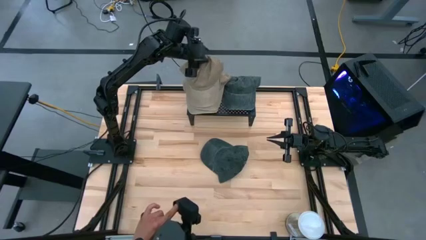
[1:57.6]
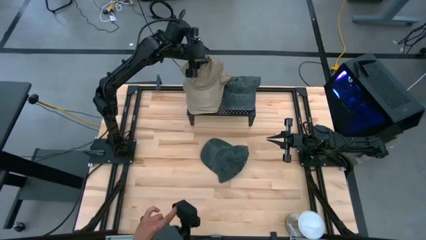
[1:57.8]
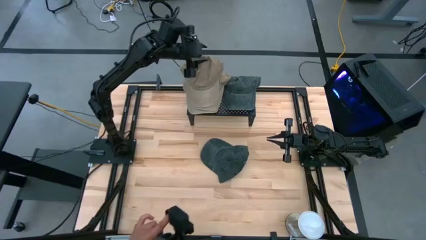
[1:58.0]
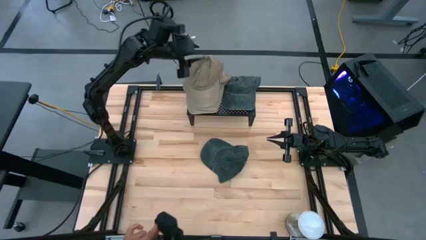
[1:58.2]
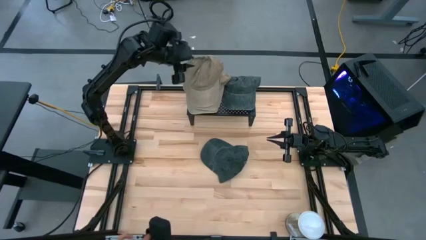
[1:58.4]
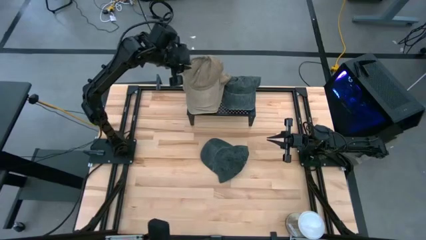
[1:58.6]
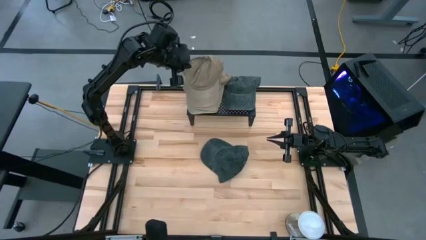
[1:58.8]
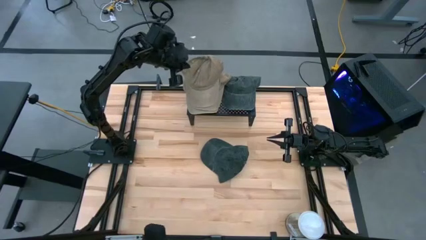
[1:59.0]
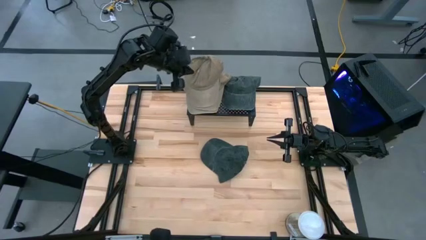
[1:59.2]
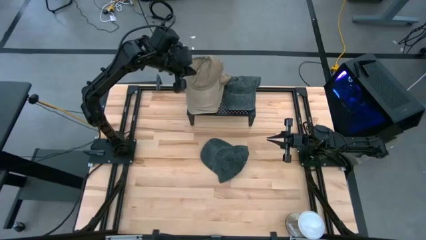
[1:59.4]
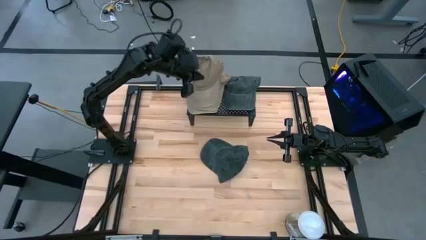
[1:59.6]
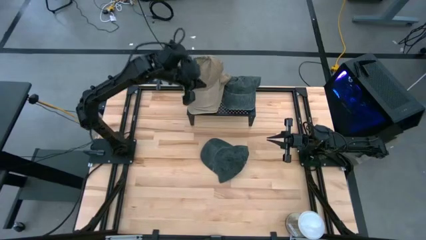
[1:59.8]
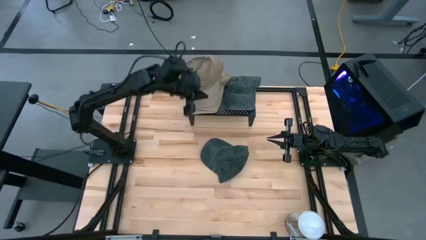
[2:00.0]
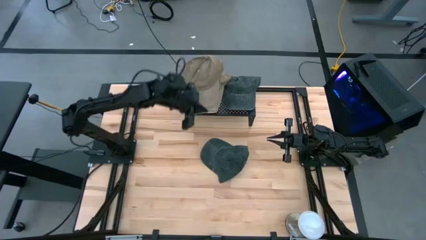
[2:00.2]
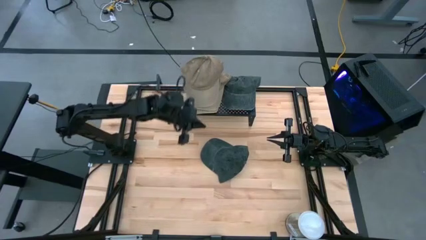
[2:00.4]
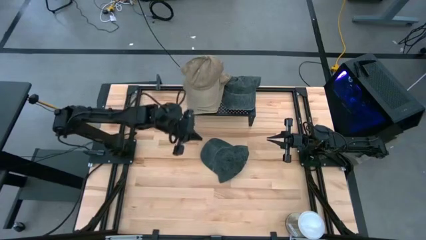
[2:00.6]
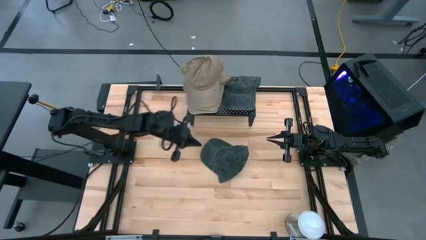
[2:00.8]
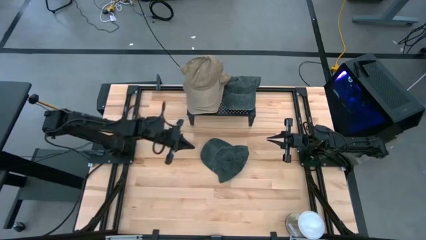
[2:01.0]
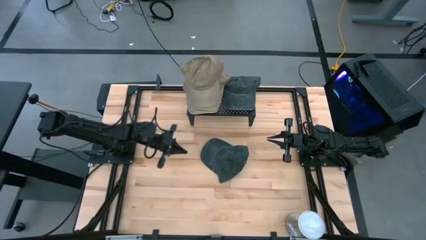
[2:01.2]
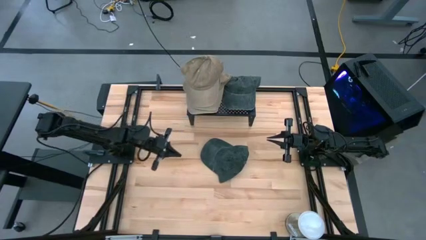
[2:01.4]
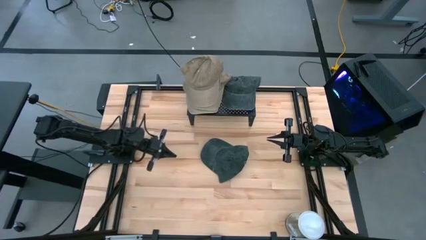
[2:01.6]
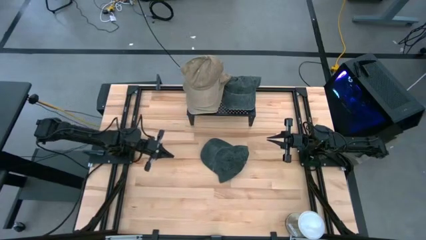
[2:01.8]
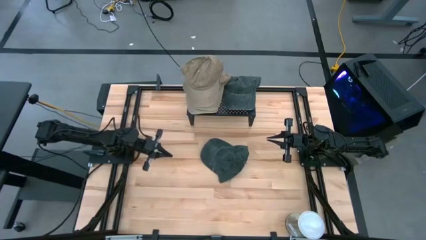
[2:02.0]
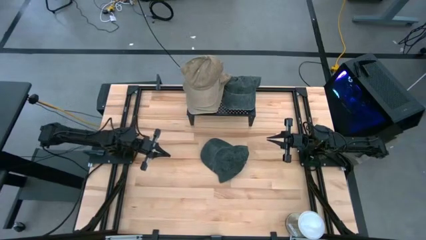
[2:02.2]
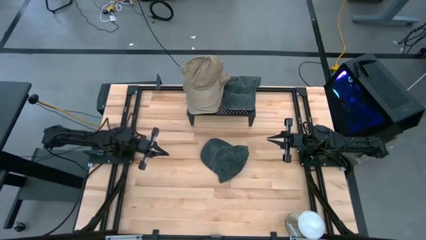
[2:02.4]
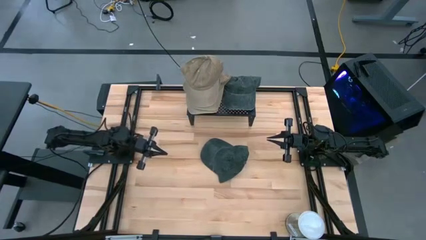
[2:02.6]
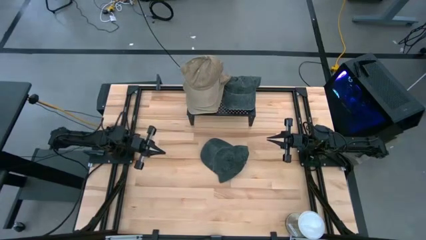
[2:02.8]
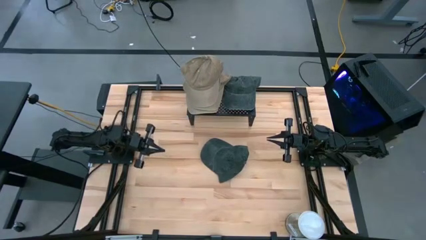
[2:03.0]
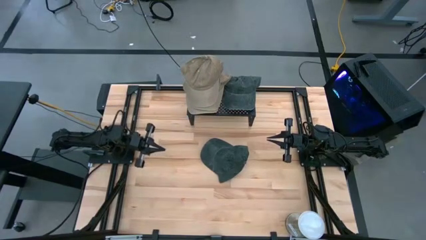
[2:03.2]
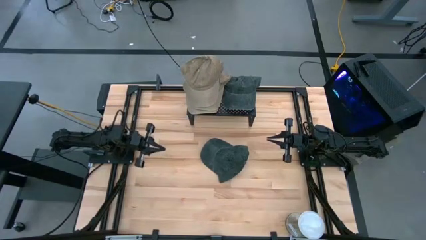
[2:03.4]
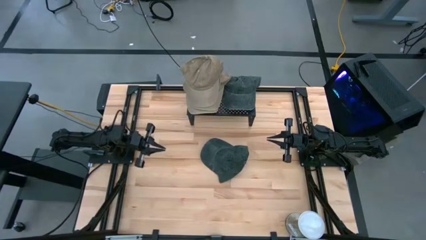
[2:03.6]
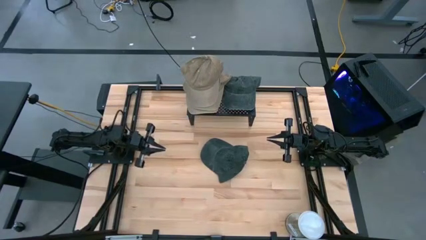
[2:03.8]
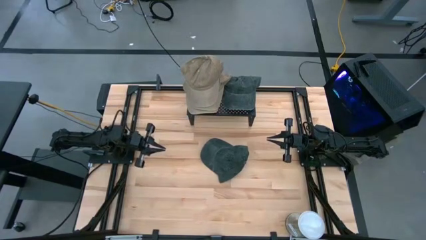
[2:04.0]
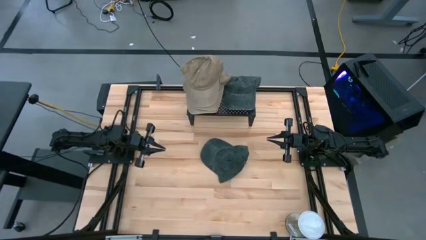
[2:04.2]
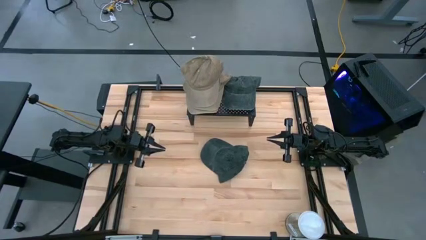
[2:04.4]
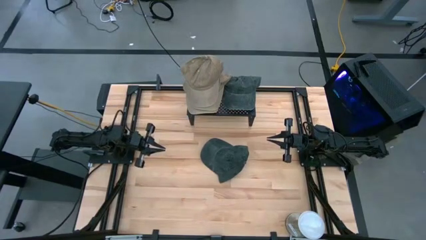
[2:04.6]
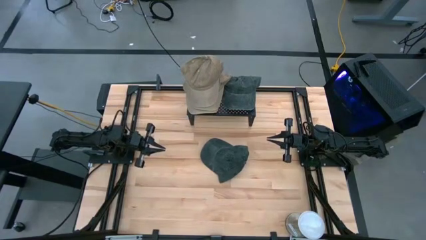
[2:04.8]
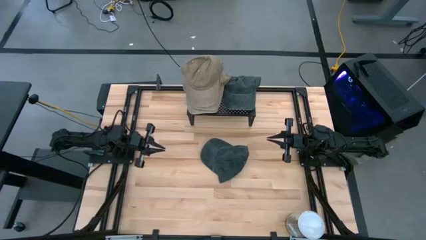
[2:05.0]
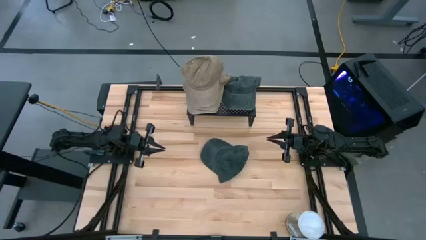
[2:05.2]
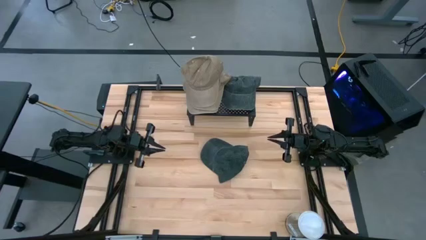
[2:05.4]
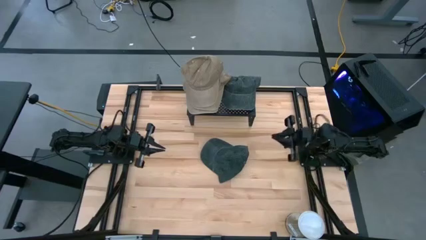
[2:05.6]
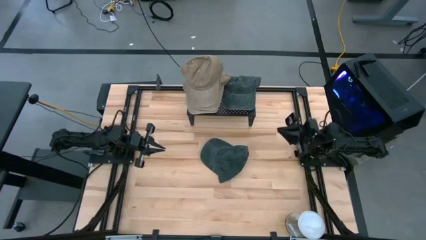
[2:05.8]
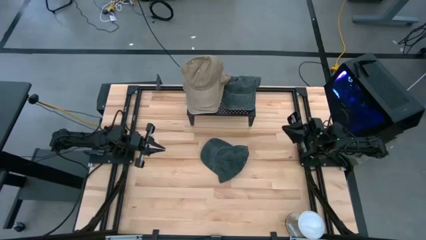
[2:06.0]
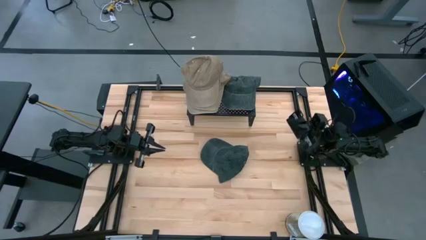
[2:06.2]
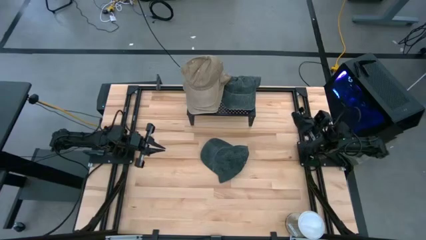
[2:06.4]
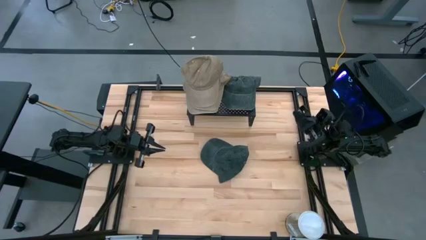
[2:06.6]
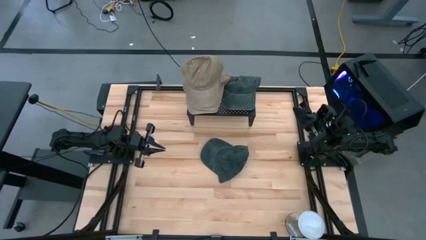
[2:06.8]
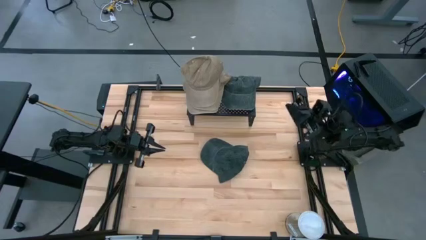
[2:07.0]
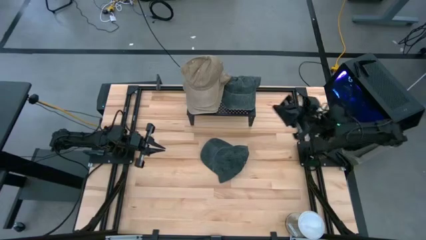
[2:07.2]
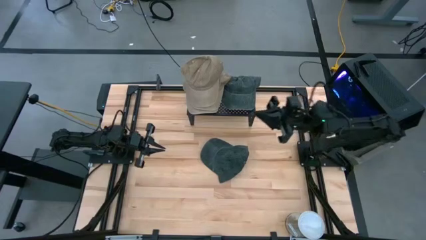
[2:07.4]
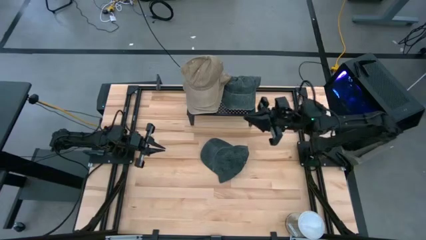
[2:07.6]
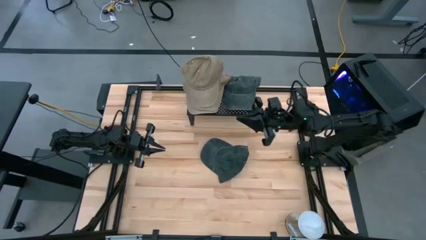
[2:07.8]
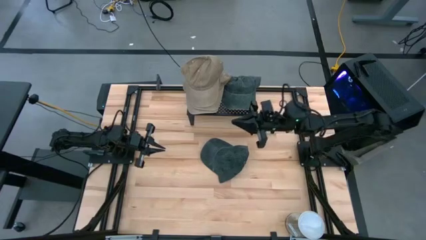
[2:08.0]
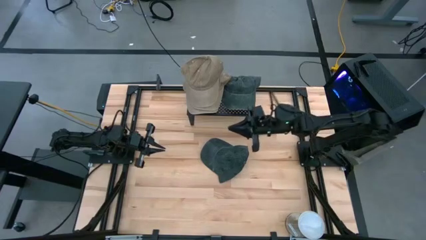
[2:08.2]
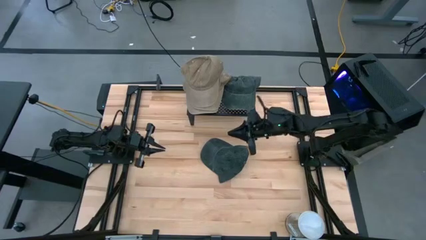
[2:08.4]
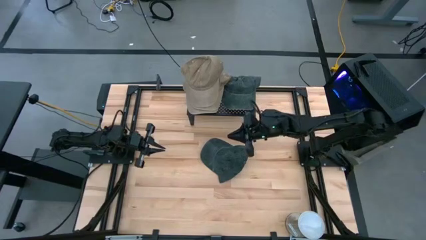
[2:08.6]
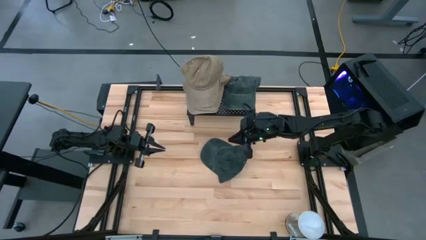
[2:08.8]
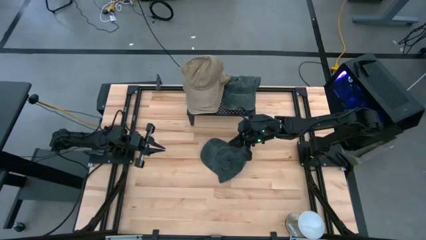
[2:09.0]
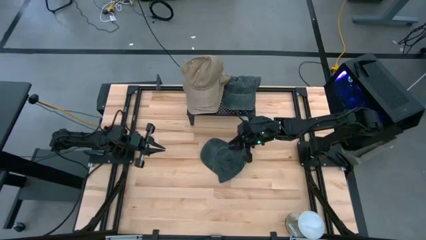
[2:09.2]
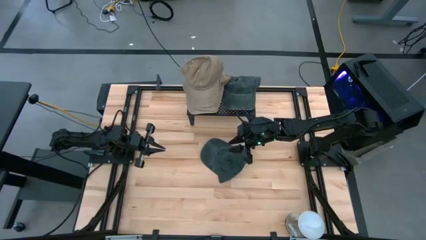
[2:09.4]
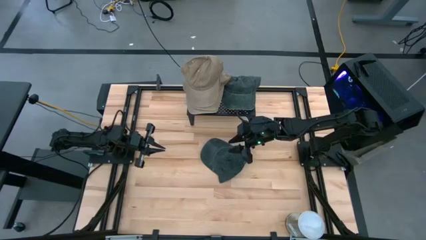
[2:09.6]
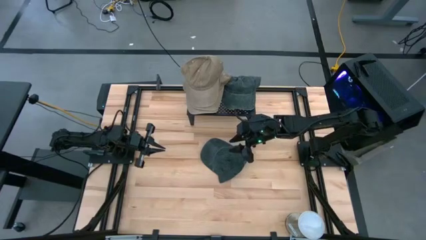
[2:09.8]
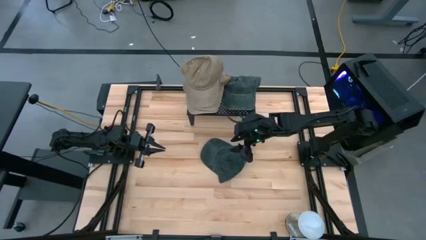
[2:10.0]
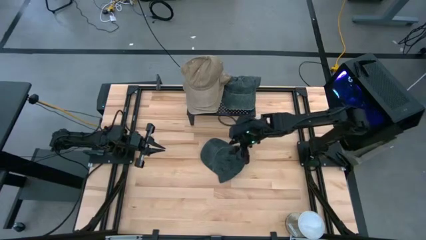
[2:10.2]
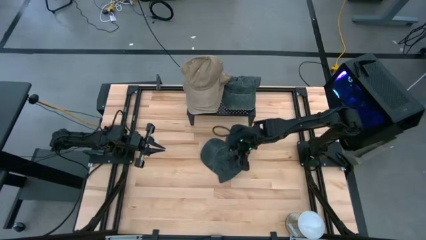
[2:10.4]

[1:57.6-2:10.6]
Task: Pick & Place hat
Stack the black cap on the other black cap on the shelf

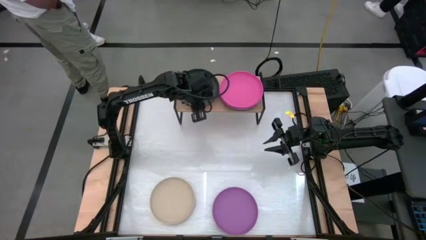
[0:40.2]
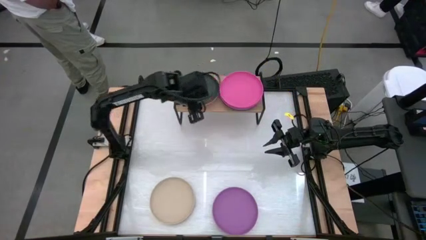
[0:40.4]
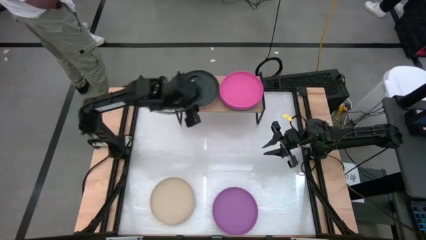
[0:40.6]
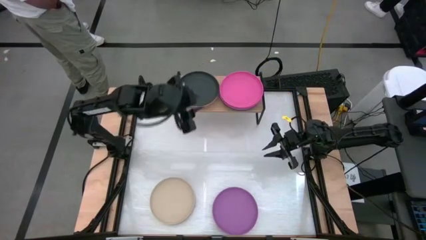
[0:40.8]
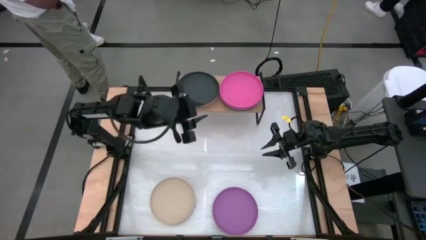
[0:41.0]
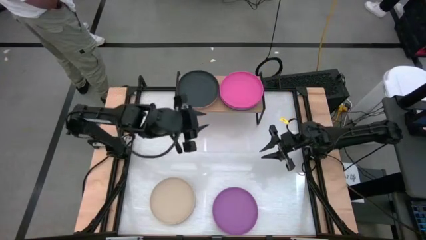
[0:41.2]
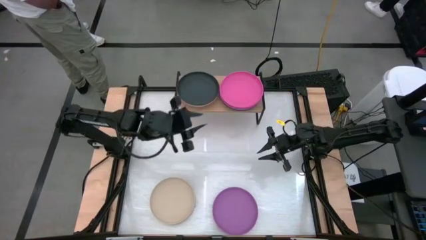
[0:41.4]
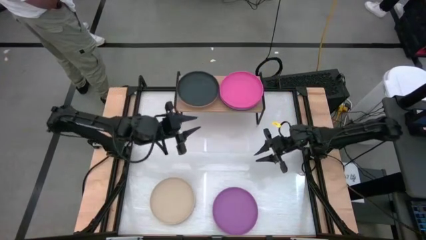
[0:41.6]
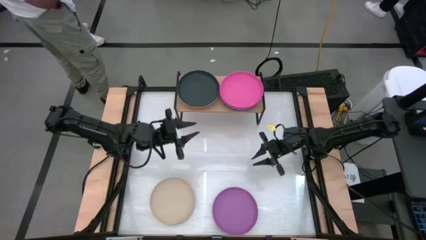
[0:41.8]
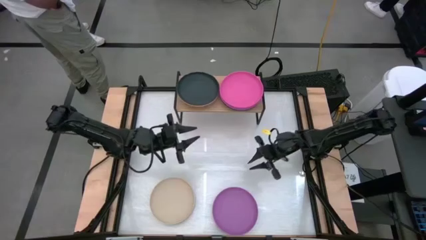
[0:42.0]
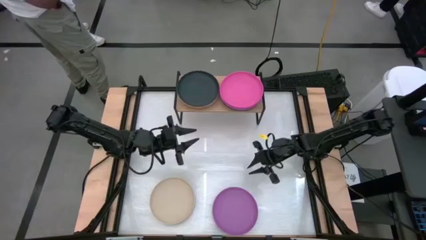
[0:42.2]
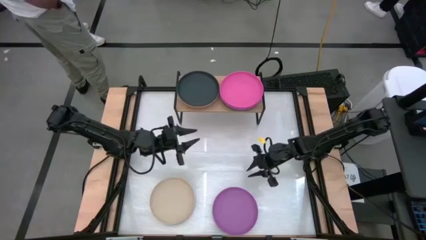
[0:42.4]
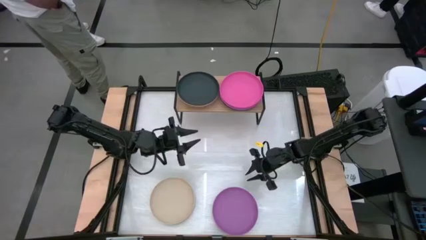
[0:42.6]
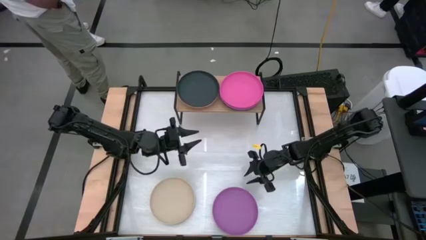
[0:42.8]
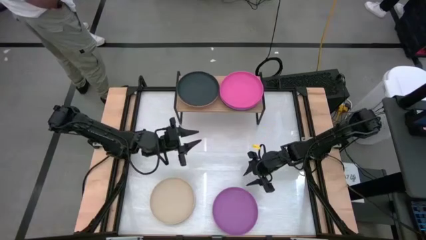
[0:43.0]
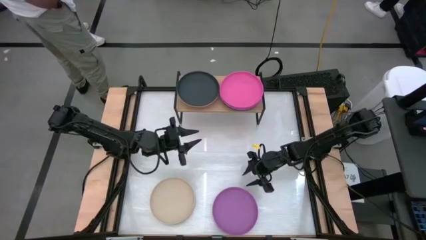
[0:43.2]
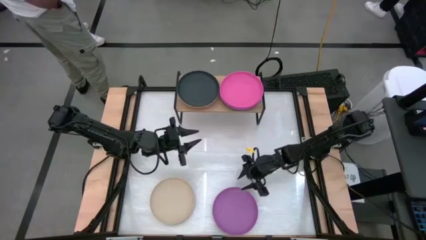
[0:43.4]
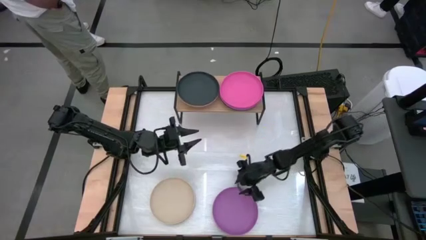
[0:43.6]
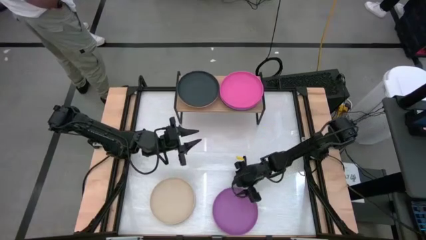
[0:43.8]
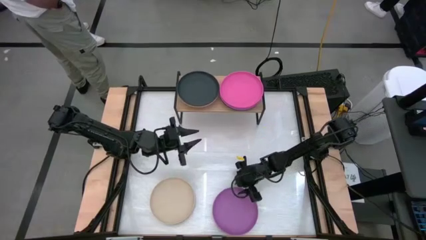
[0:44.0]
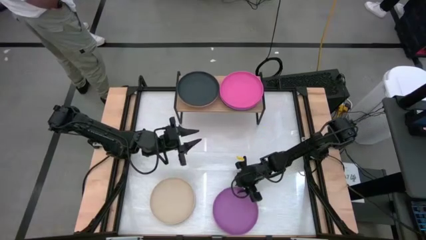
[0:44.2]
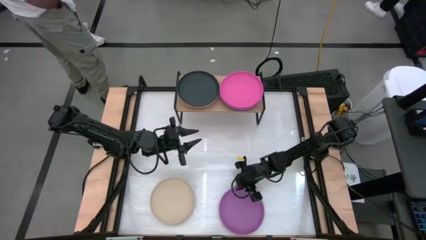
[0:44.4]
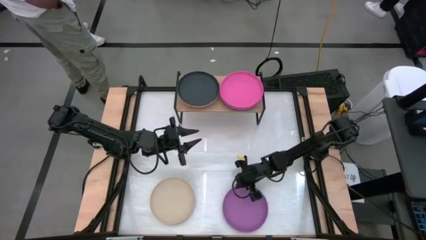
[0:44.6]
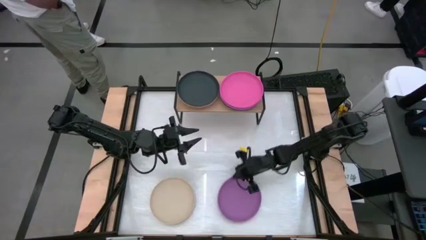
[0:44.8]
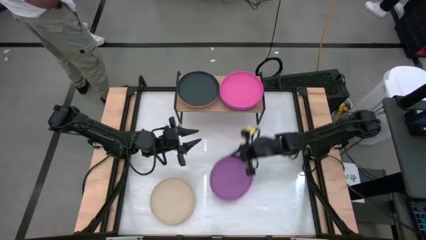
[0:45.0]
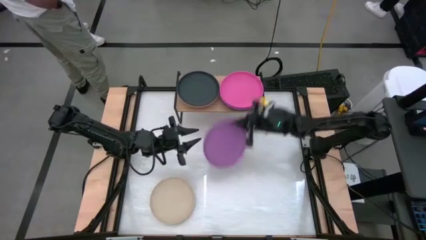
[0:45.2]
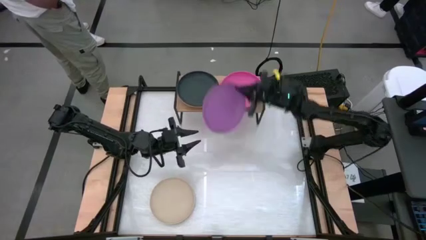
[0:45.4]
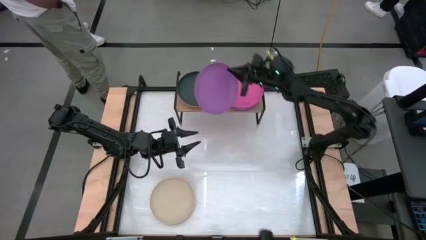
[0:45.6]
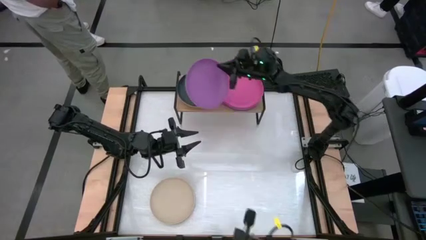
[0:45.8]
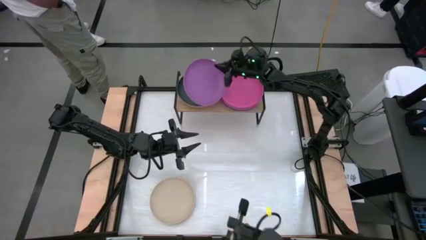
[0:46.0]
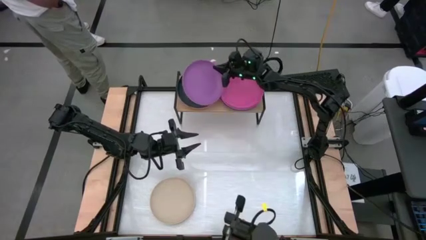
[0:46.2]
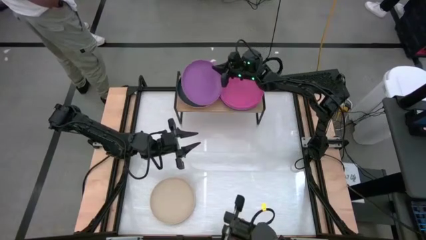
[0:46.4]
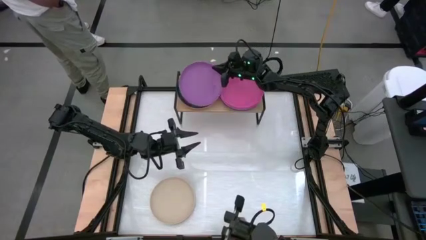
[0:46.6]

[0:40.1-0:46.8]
Task: Place and stack plates onto a shelf
Stack the purple plate on top of the black plate on the shelf
